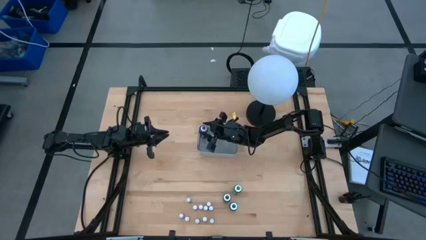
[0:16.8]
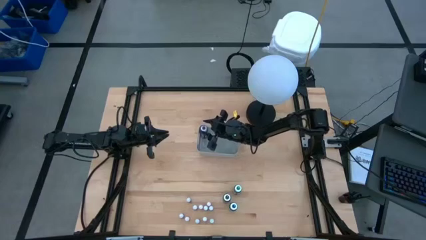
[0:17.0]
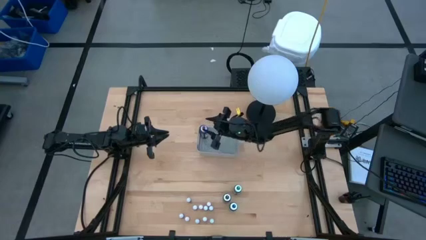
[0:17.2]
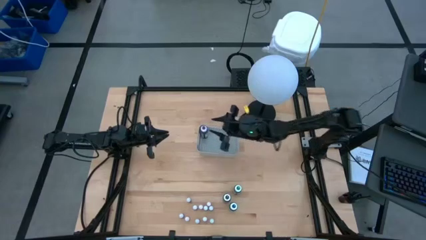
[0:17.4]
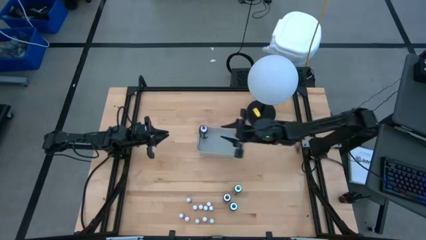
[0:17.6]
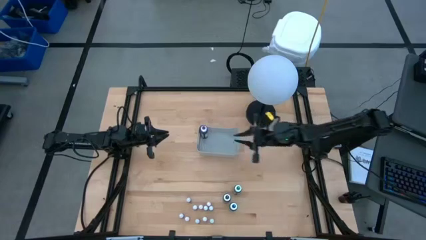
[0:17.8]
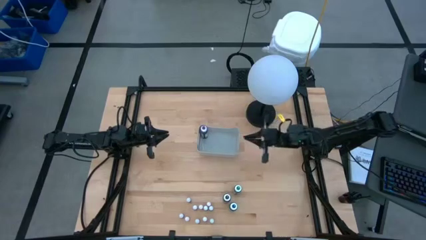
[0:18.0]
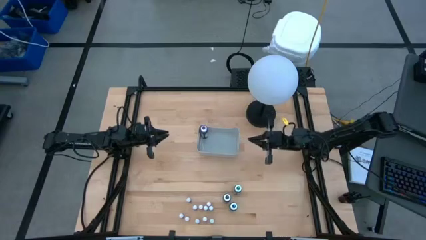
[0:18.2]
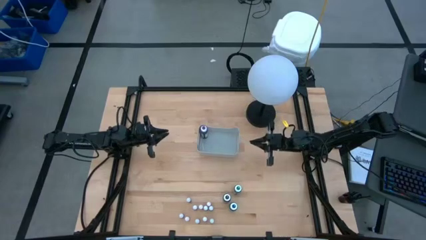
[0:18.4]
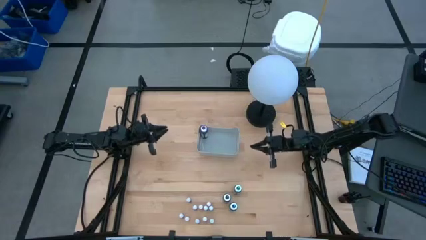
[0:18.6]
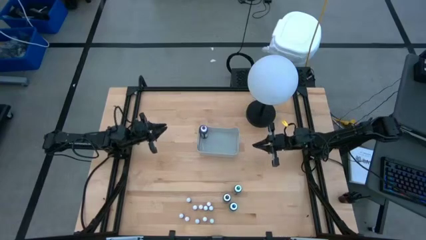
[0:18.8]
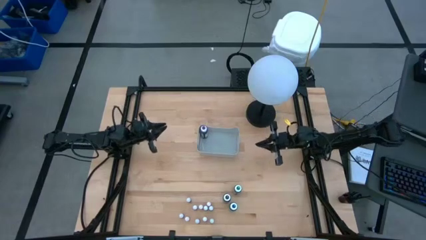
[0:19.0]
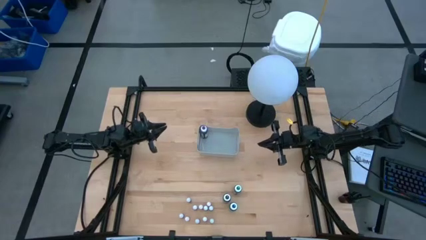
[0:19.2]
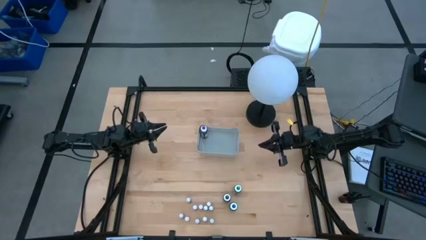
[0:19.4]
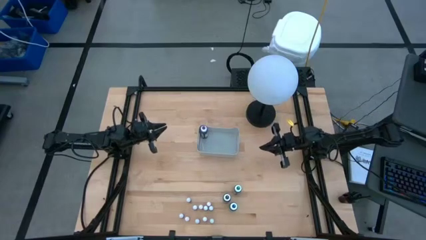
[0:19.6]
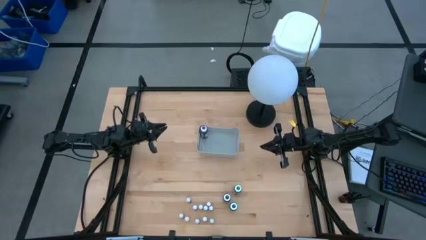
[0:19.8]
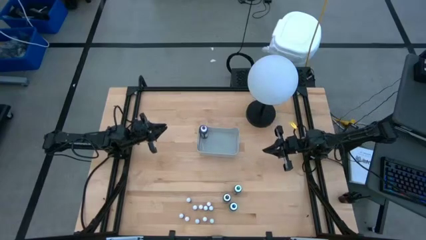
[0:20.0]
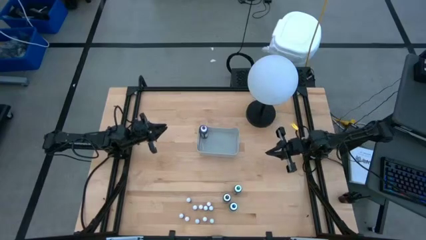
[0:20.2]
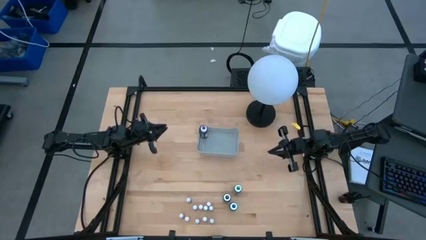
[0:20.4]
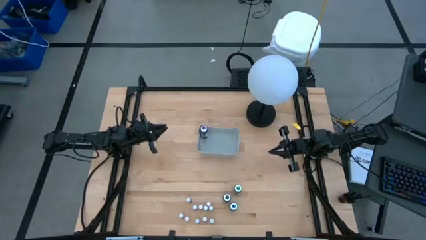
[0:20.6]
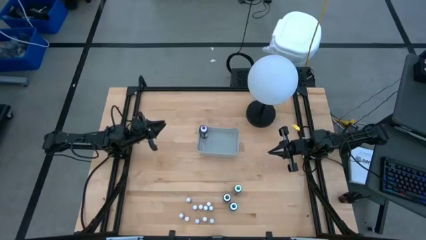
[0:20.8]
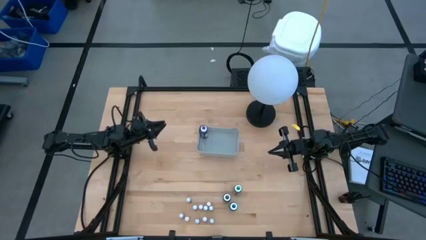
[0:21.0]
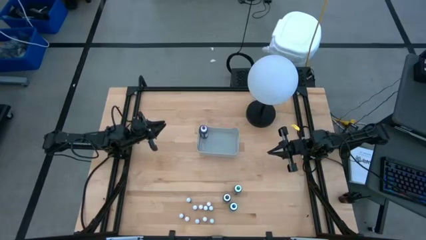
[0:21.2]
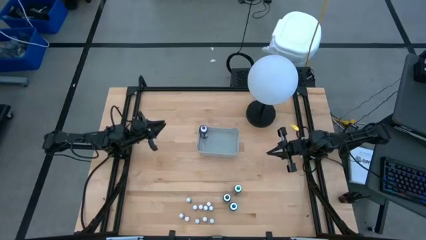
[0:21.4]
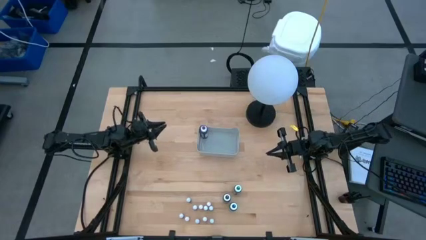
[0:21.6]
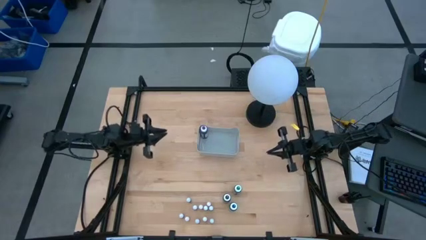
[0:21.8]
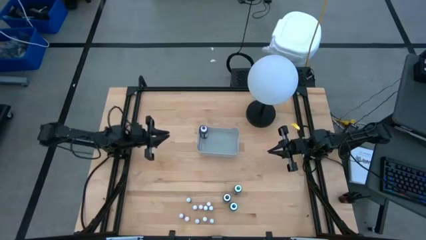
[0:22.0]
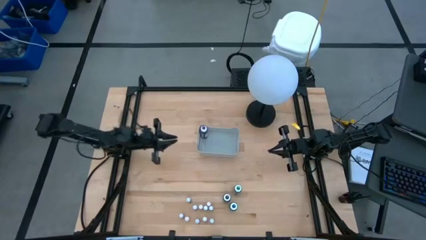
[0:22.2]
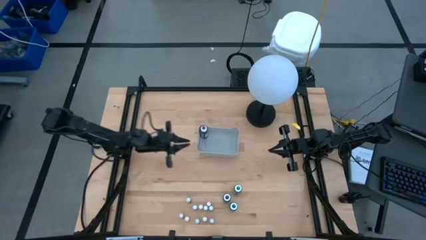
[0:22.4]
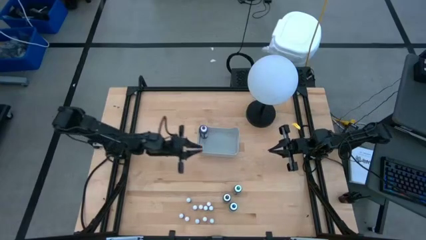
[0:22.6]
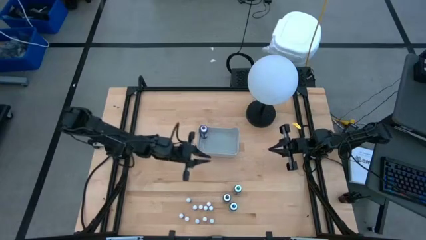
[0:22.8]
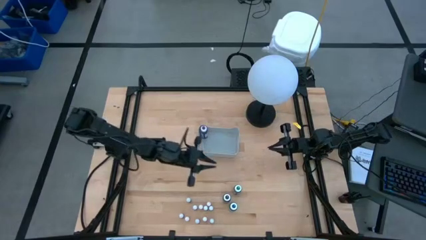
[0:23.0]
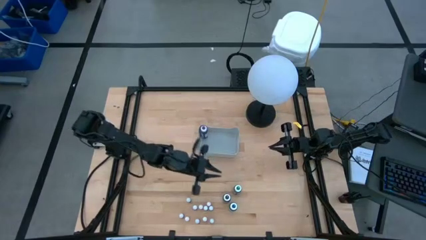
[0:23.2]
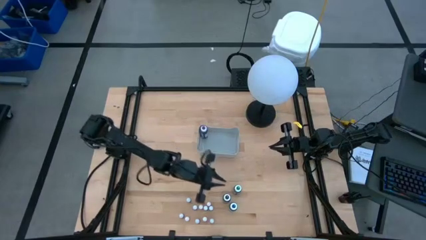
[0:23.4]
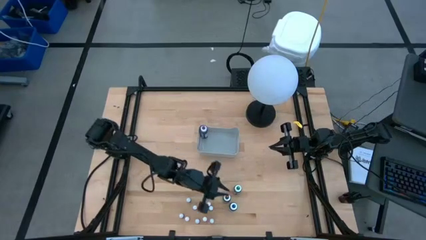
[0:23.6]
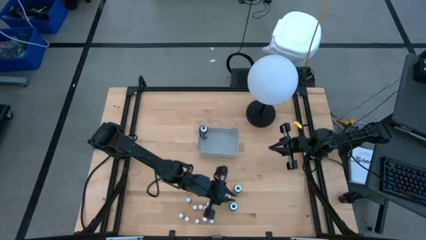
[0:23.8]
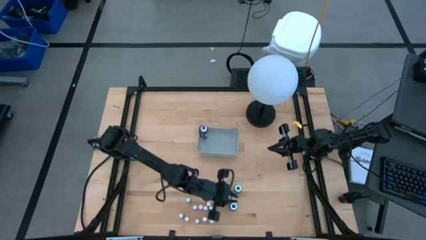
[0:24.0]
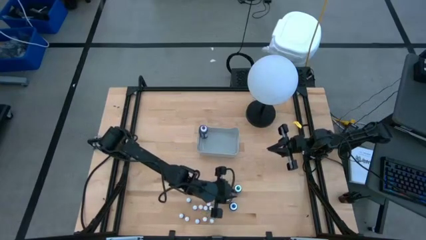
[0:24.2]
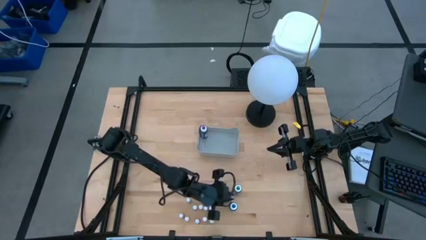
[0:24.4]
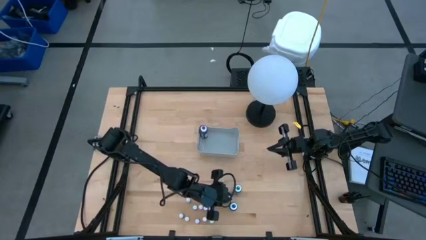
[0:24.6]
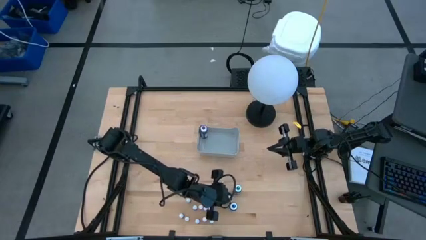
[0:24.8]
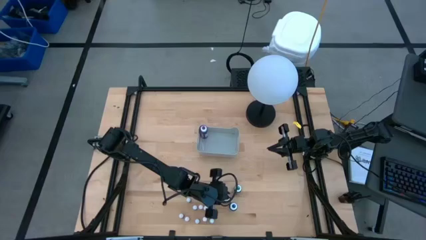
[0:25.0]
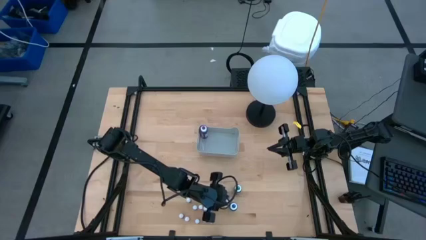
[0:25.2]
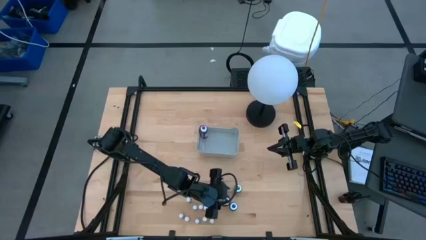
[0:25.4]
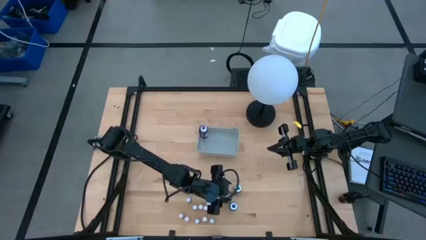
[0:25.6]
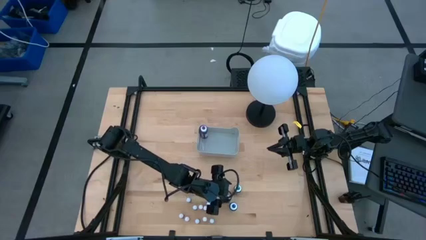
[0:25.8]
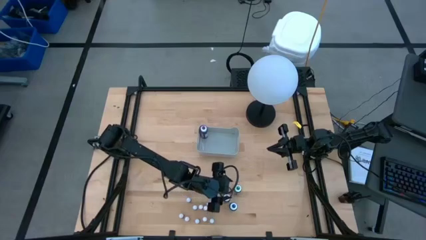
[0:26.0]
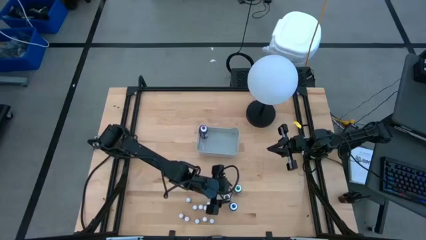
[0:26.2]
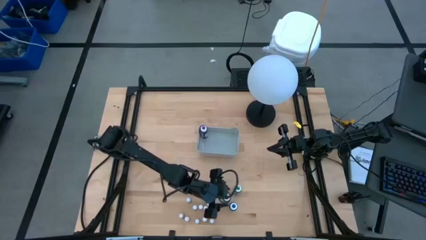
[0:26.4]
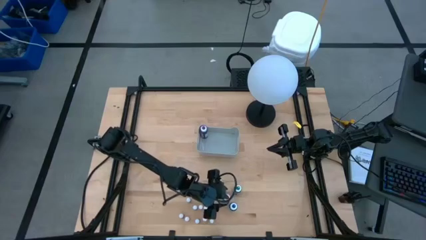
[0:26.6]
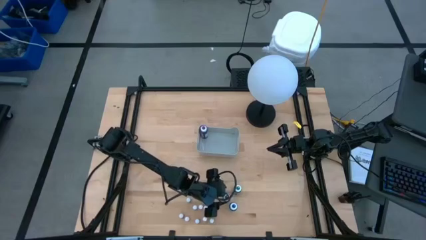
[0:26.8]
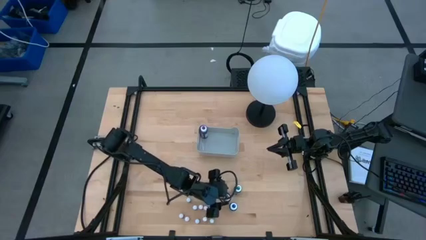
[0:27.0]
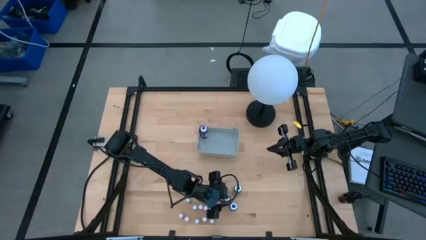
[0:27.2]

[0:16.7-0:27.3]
Task: Pick & Place food coloring
Put the large black food coloring bottle into the gray bin

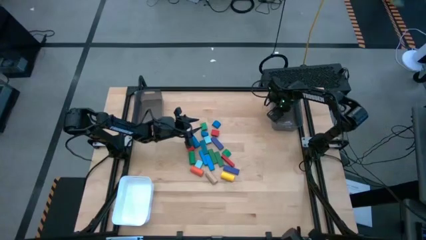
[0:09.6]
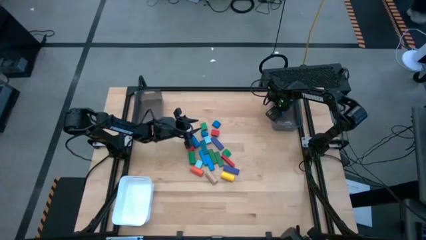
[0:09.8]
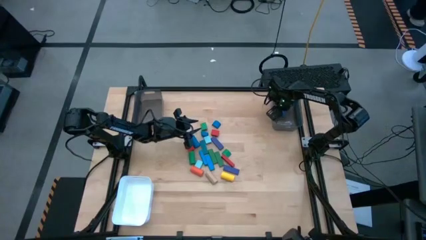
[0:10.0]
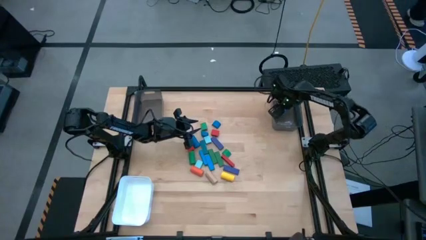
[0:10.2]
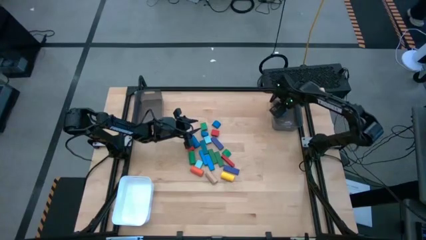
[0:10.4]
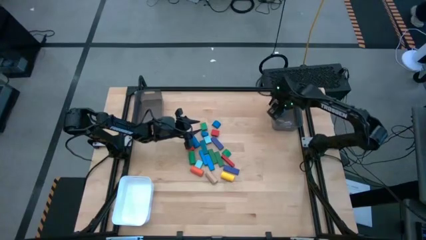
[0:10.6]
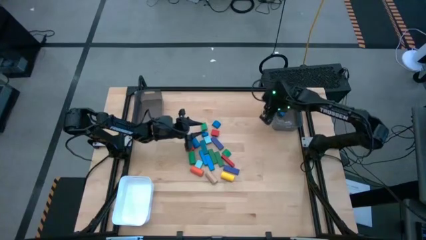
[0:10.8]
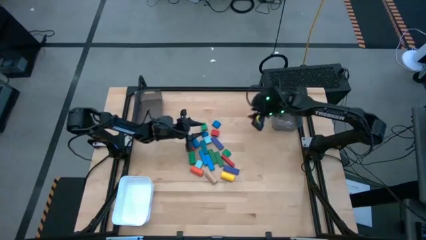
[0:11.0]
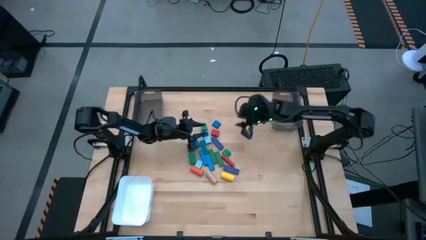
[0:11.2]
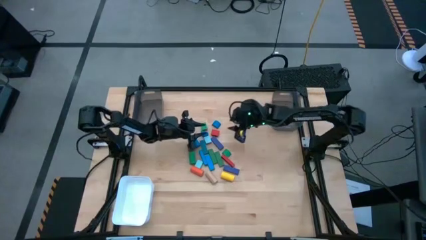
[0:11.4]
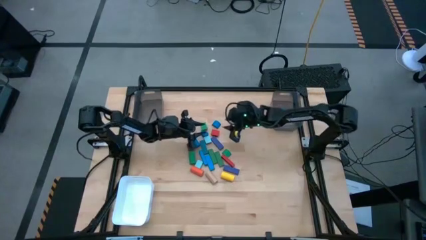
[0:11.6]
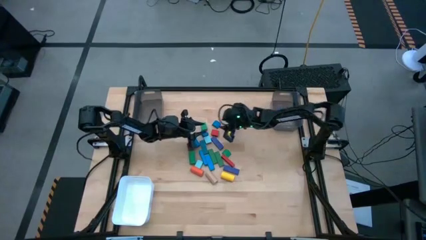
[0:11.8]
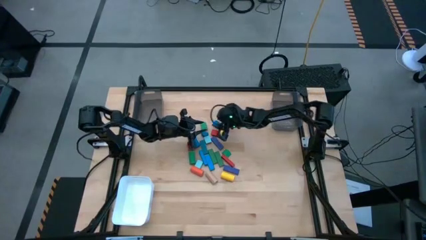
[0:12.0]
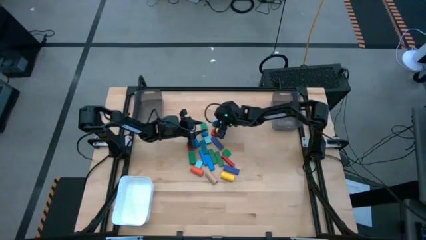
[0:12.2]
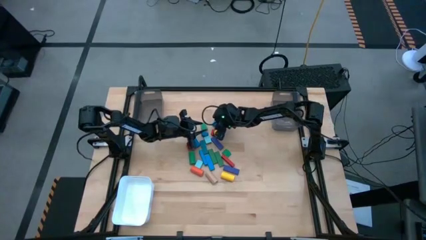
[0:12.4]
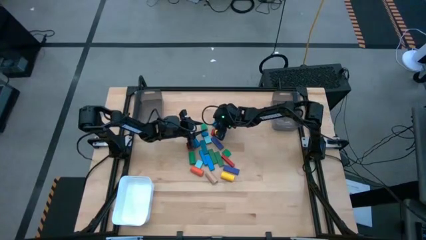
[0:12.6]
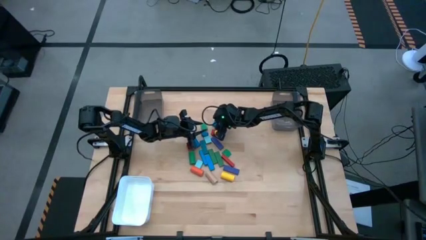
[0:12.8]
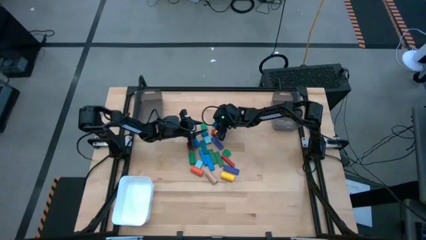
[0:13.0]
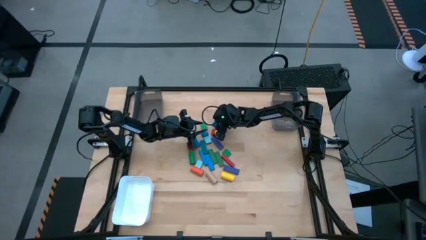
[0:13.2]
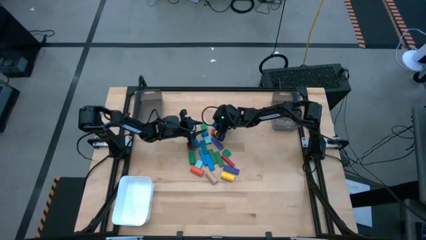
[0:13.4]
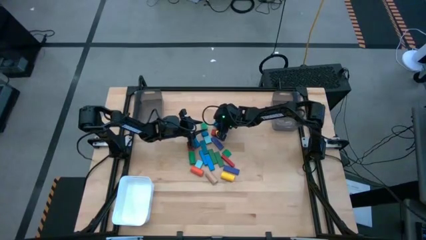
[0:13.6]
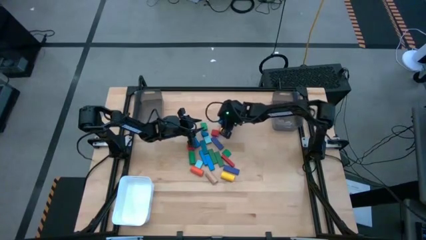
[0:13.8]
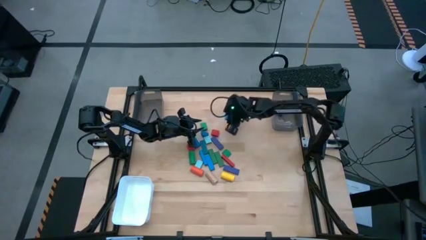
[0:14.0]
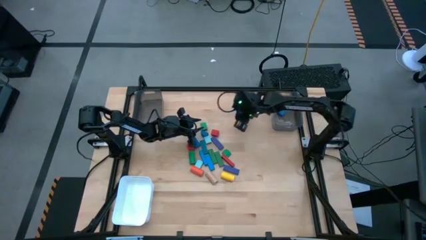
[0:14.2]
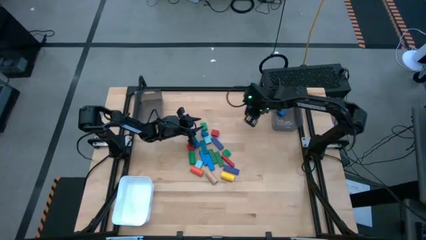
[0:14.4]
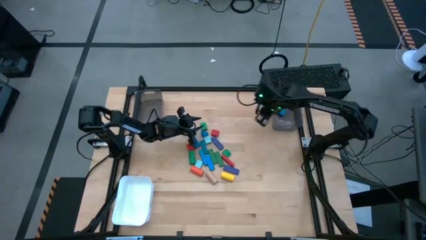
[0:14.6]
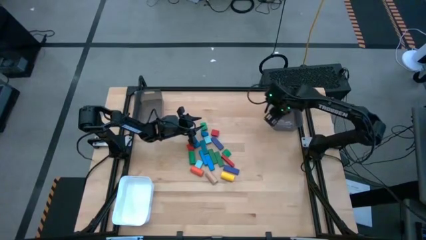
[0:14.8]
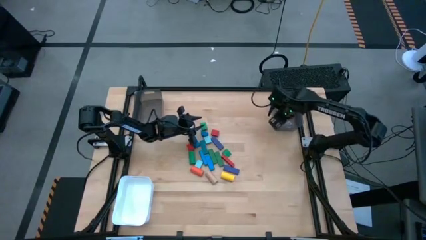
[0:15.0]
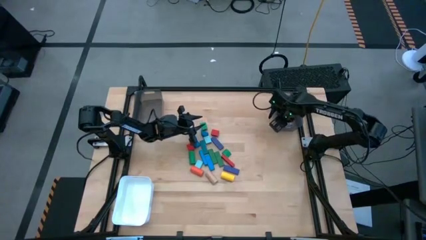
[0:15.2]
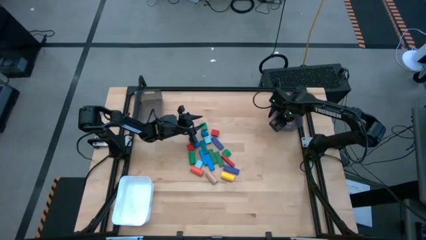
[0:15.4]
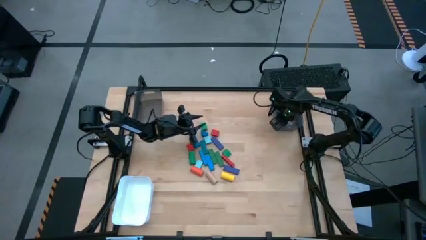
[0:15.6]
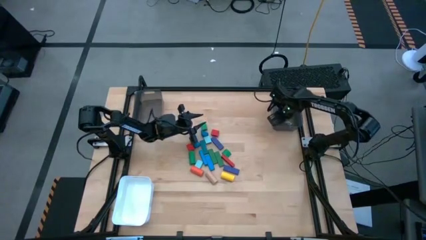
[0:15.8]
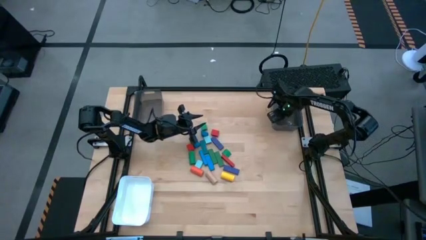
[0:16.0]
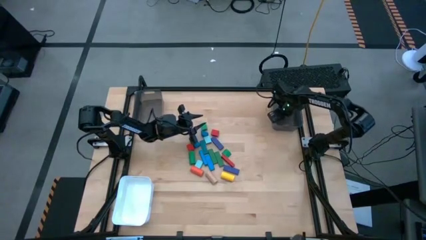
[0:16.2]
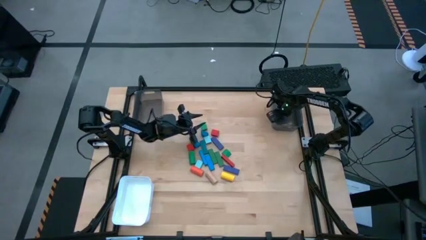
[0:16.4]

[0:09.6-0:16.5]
Task: Sort blocks by size
Put the blue half circle block into the right black bin
